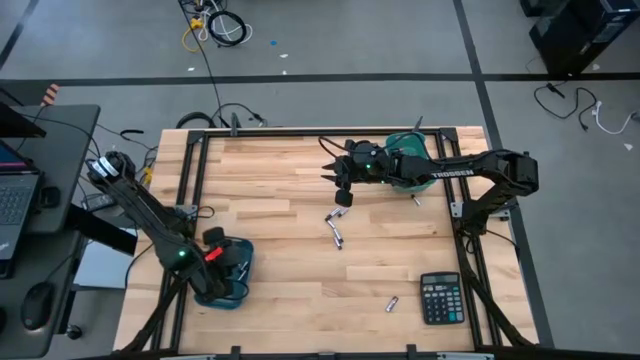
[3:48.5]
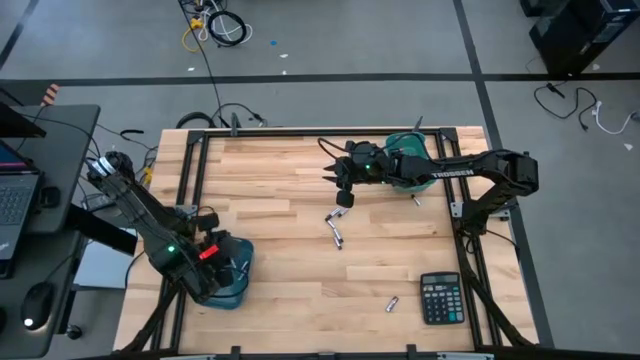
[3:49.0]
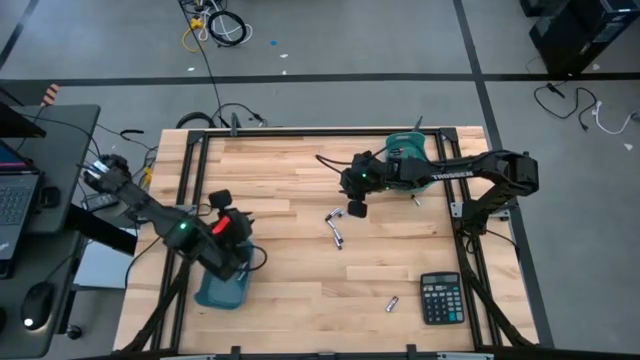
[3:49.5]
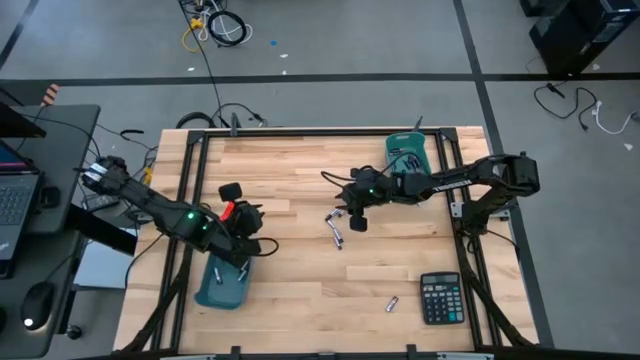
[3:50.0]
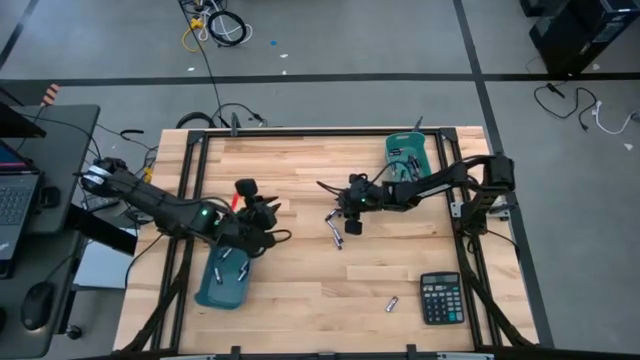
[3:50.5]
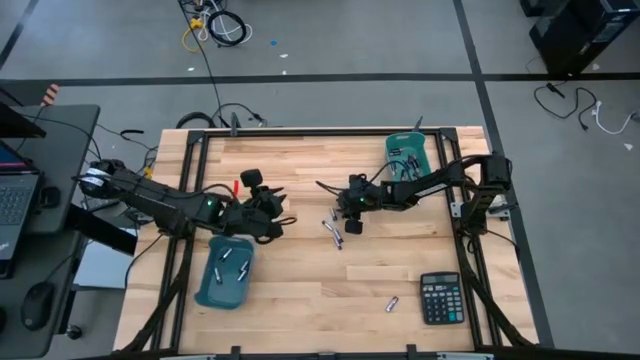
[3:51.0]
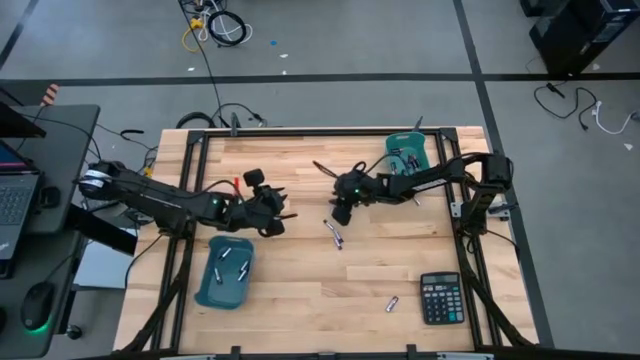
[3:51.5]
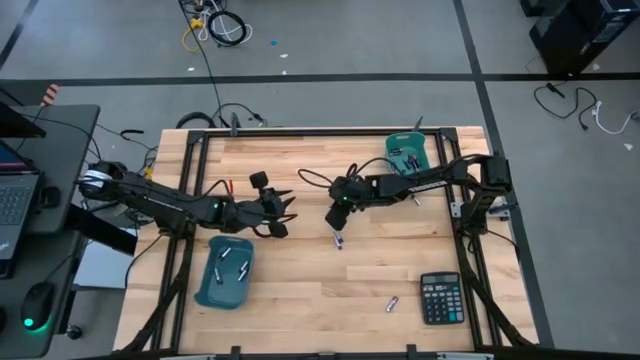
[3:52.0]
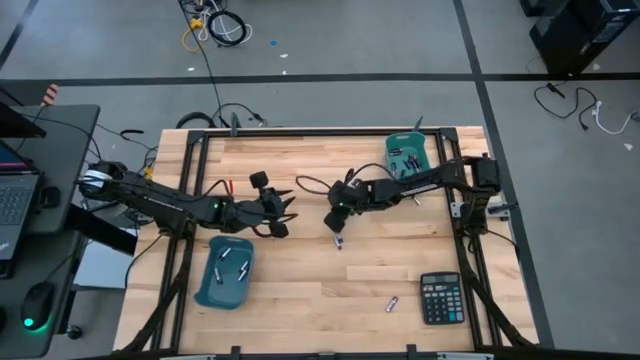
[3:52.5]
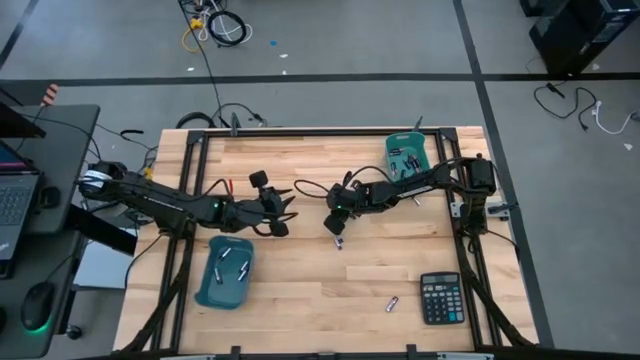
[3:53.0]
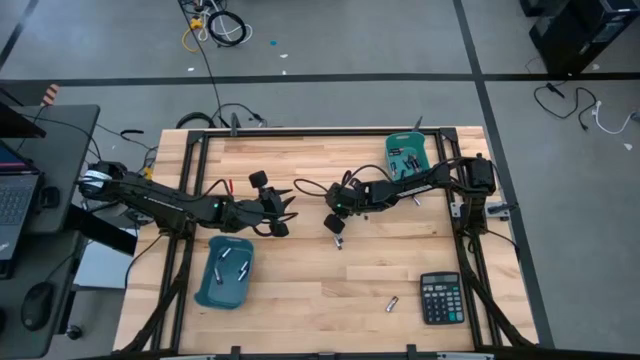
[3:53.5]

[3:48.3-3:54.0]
Task: Sort batteries
Put the silver battery into the blue bin

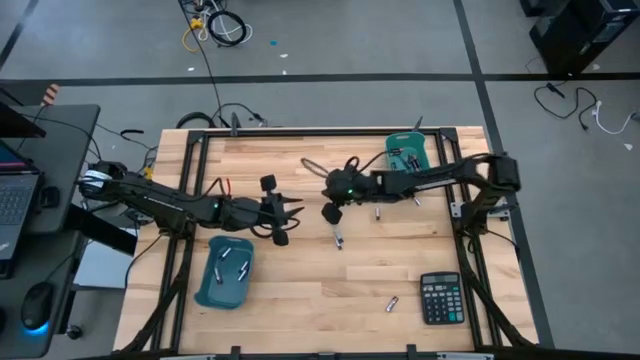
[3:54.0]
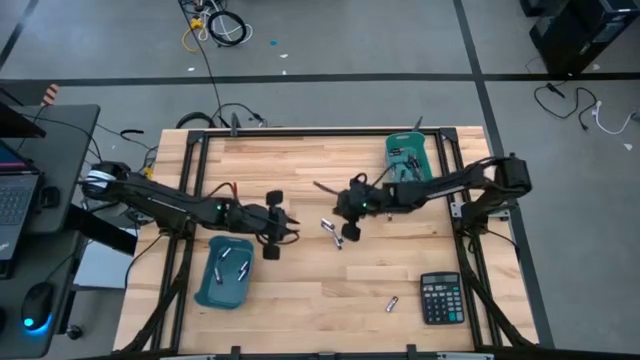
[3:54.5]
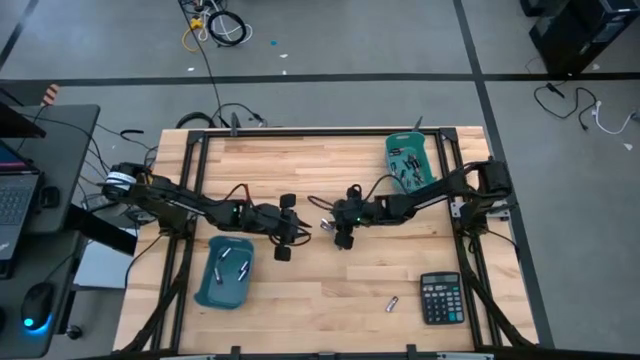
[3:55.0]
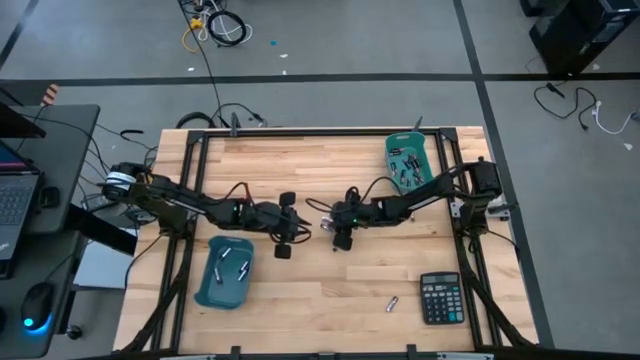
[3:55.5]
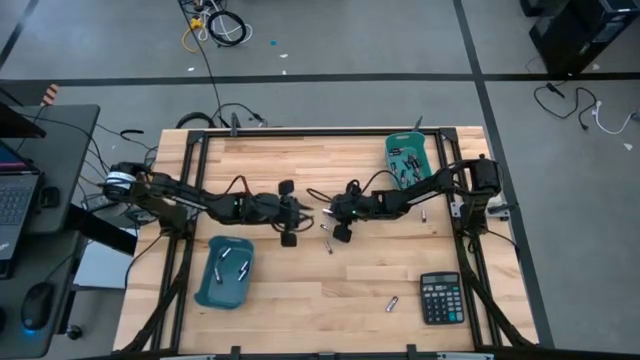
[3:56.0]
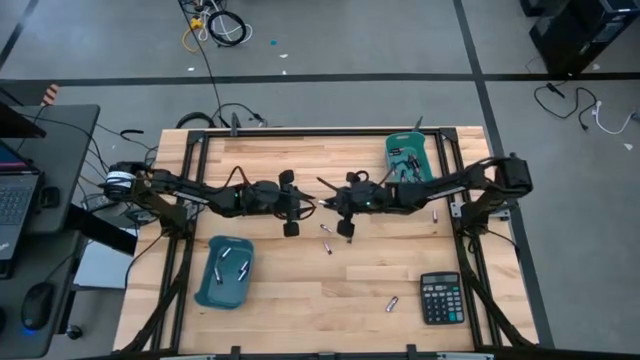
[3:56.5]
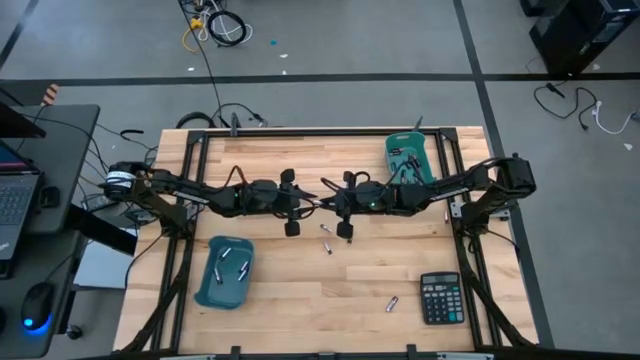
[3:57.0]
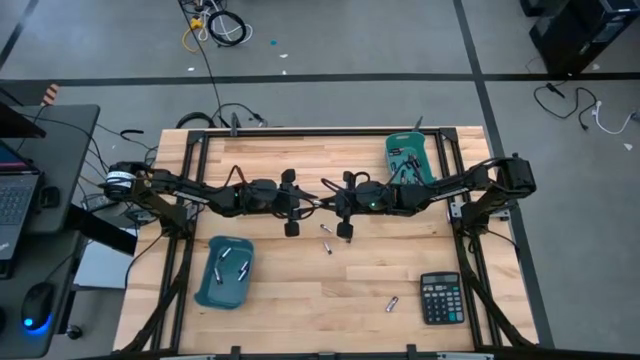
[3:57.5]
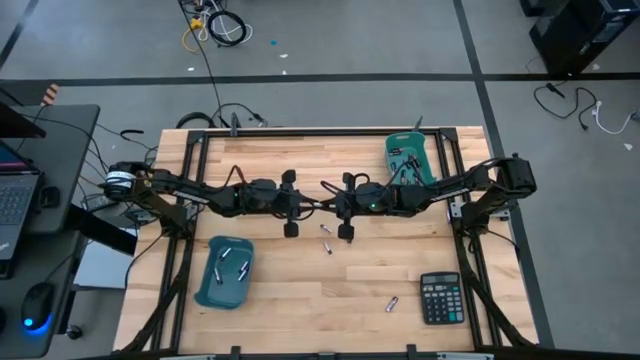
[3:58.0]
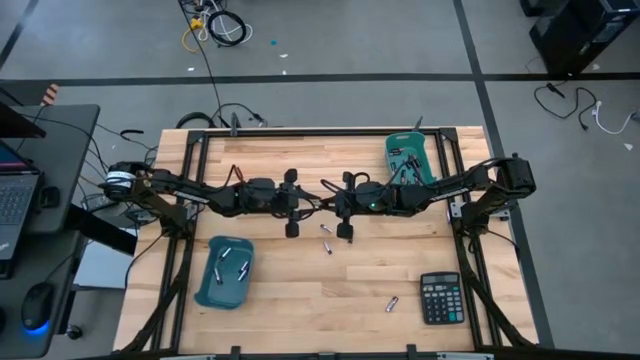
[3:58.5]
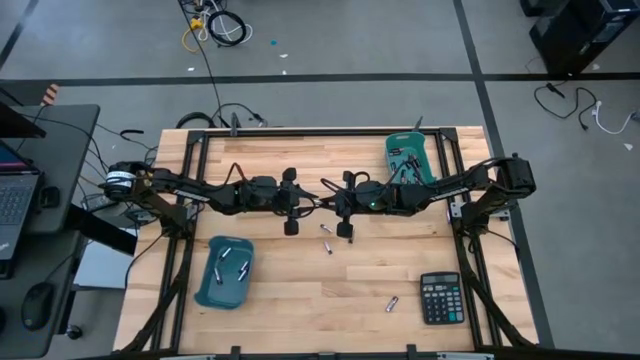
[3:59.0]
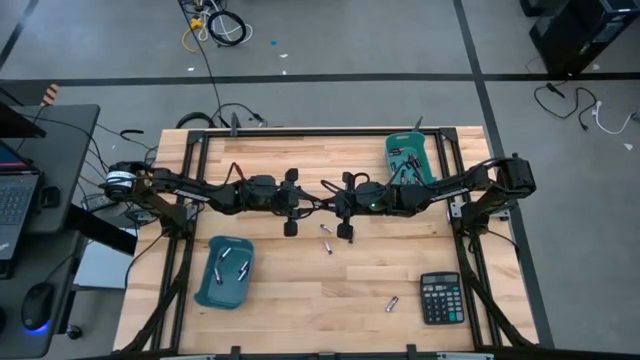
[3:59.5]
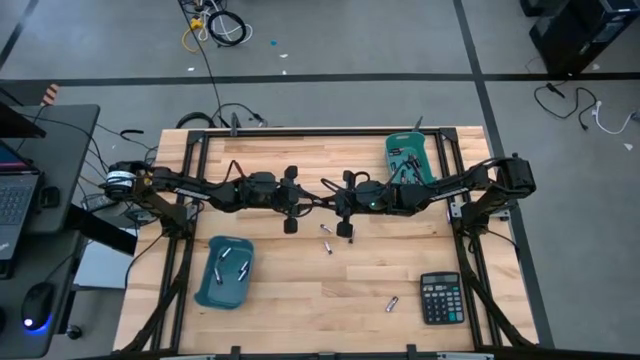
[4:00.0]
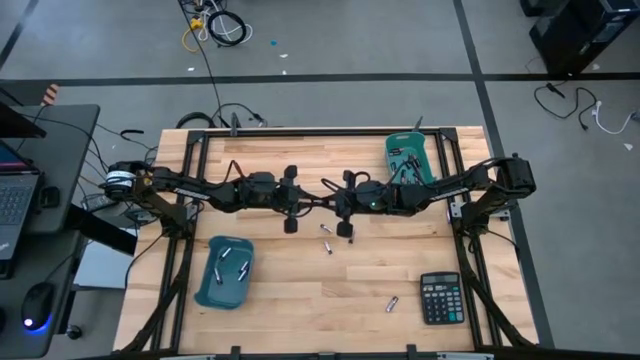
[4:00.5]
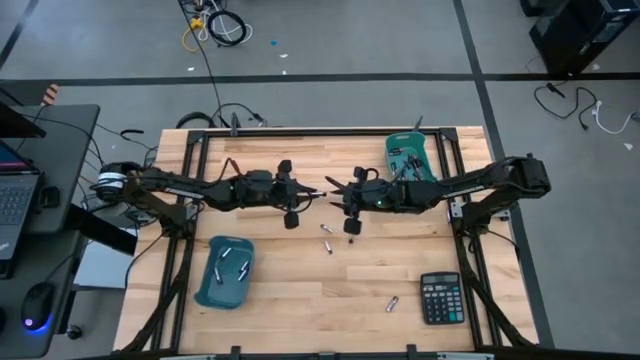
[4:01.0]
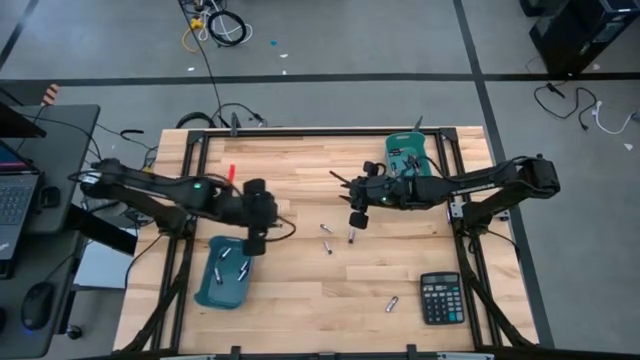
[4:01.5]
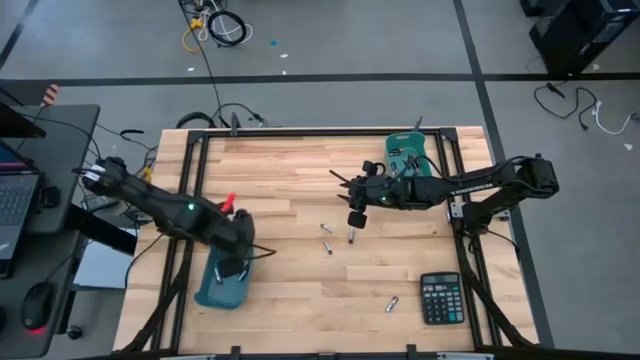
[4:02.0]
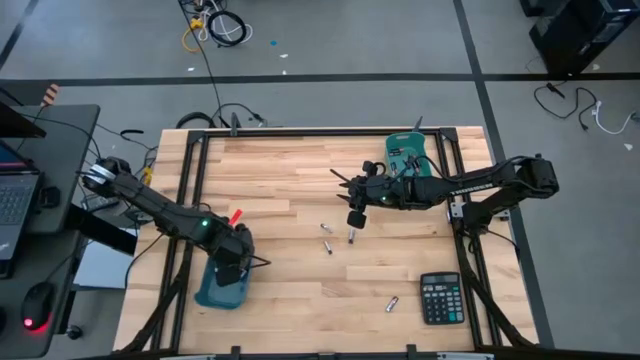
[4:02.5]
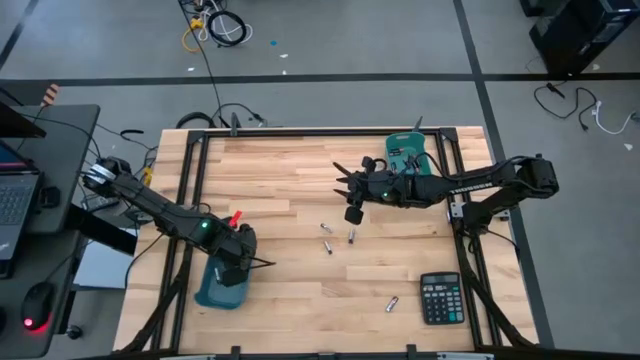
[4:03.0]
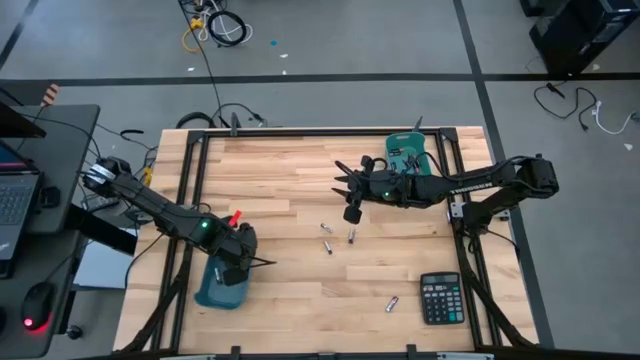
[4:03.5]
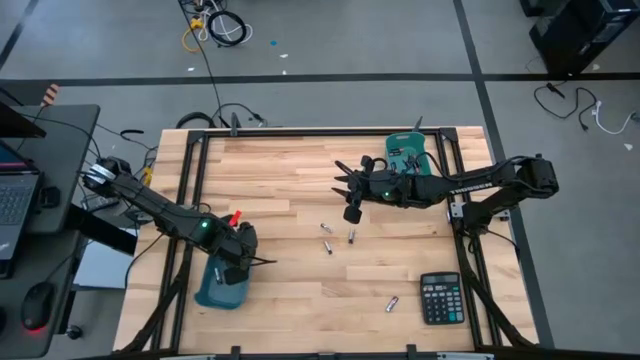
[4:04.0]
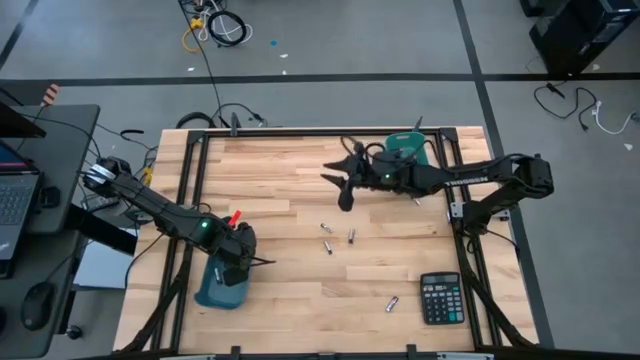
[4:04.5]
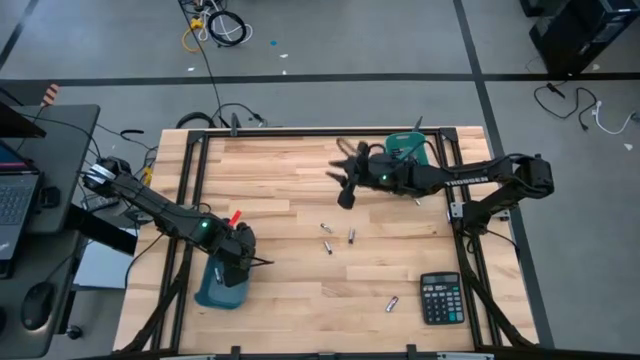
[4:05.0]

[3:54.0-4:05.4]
Put the silver battery into the blue bin

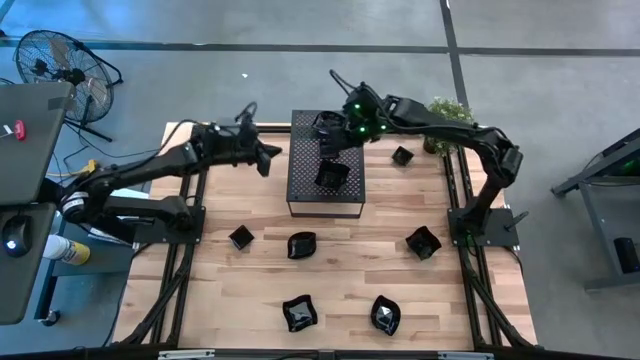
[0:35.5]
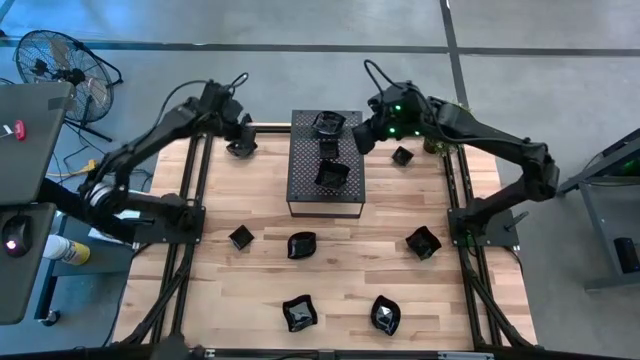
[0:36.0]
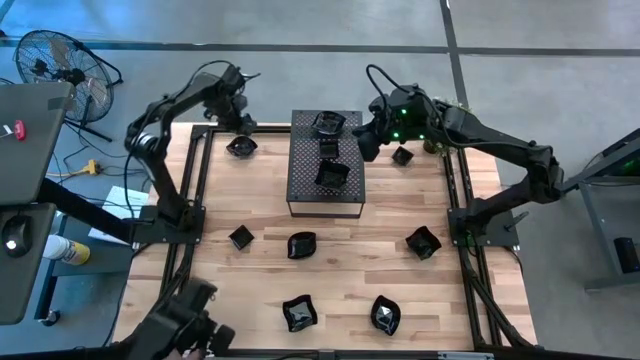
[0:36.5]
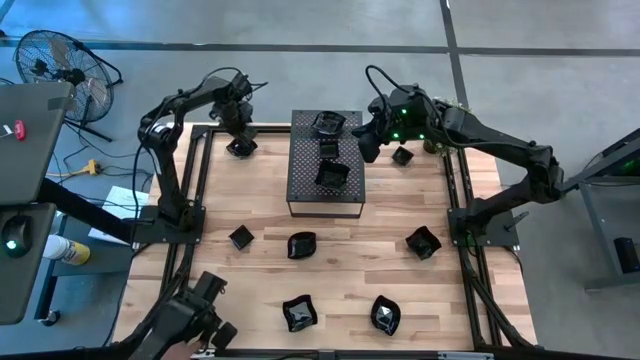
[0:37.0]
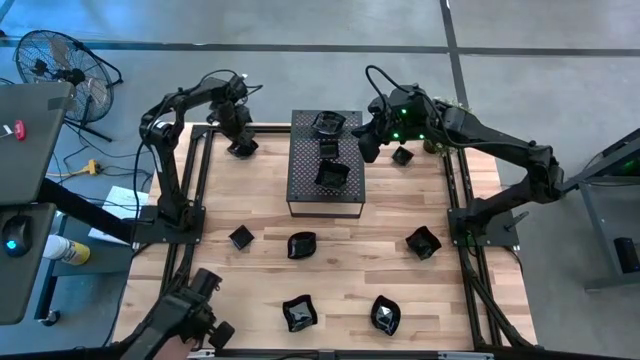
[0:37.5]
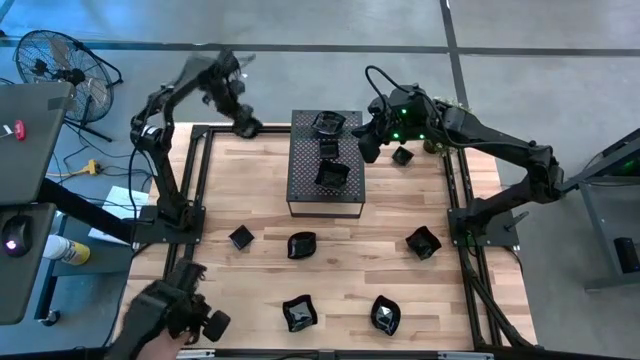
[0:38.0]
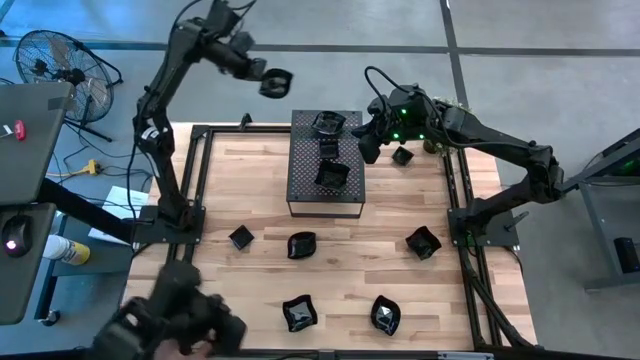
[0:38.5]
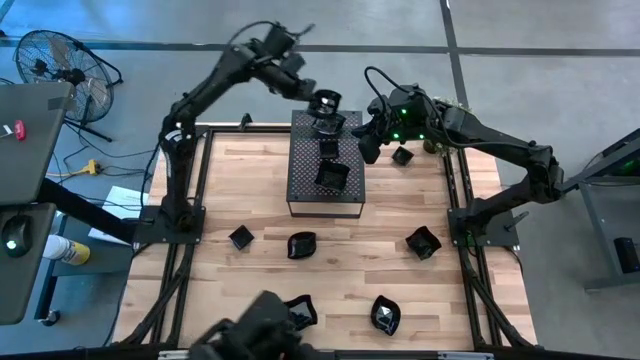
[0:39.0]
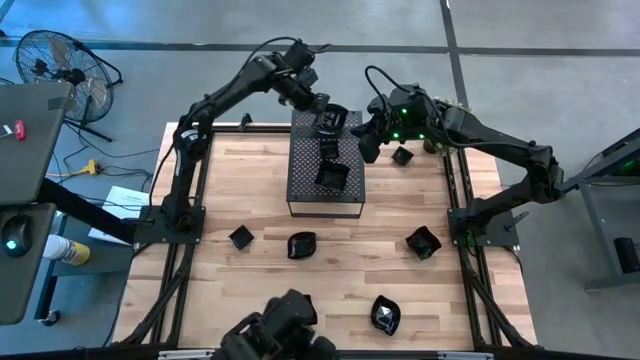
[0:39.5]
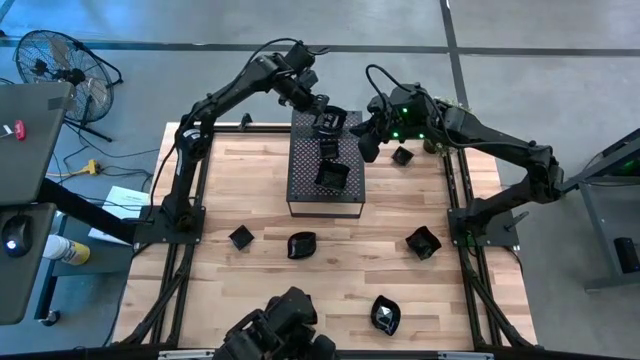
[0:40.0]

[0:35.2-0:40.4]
Task: Pick & Place Mini shaped plates
Stack the leaf-shaped plate on top of the leaf-shaped plate on the shelf
